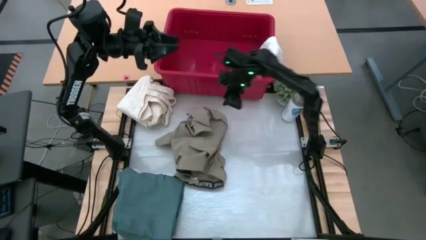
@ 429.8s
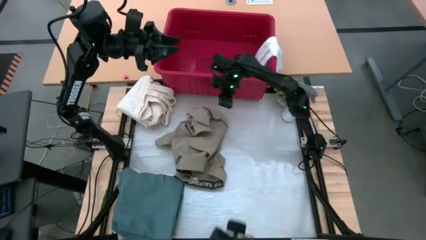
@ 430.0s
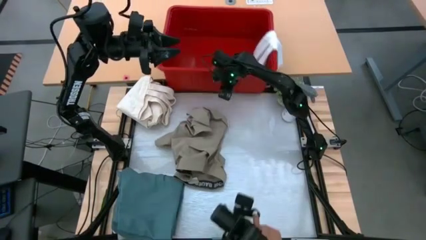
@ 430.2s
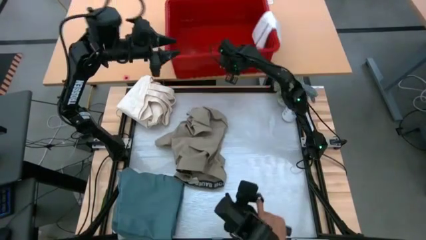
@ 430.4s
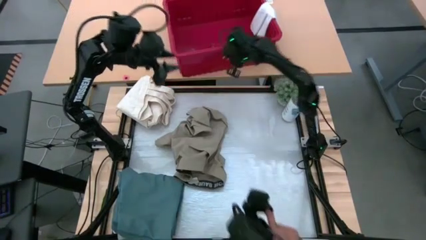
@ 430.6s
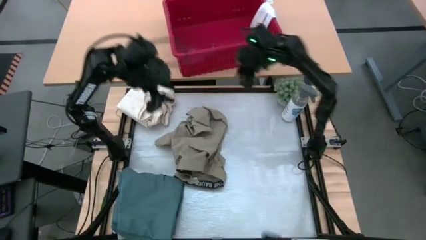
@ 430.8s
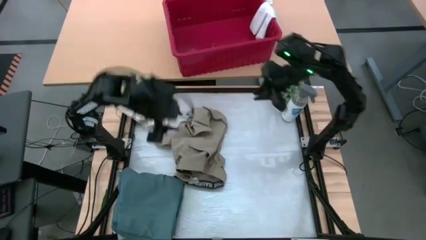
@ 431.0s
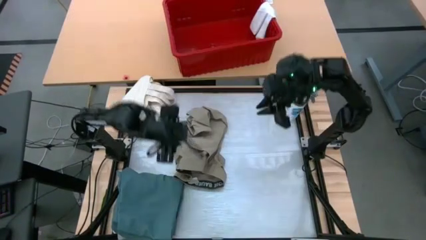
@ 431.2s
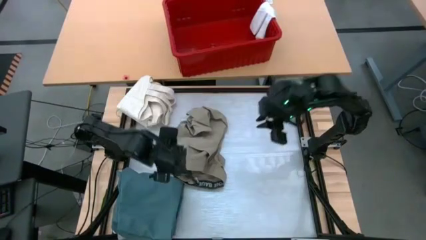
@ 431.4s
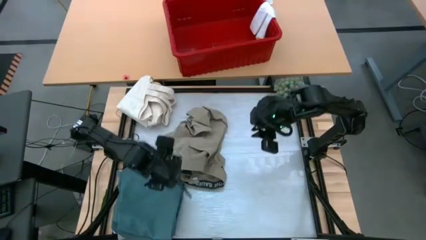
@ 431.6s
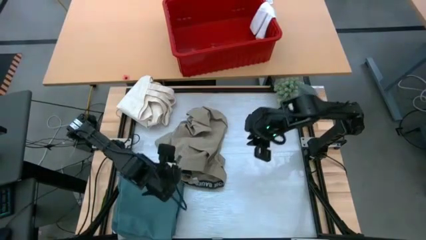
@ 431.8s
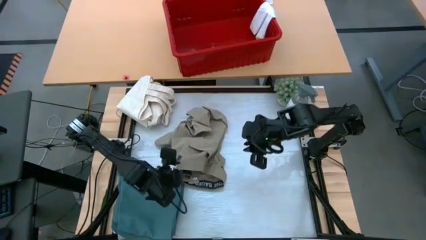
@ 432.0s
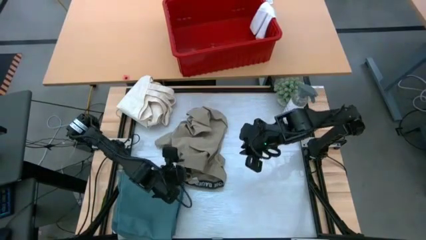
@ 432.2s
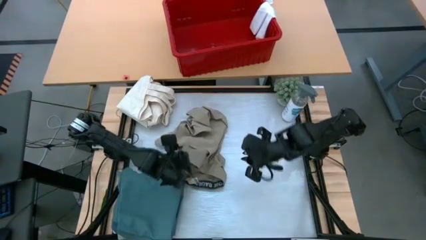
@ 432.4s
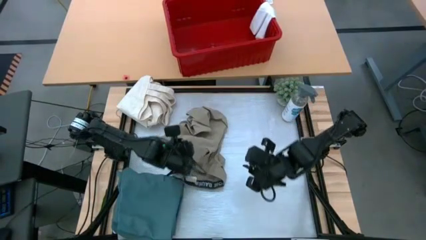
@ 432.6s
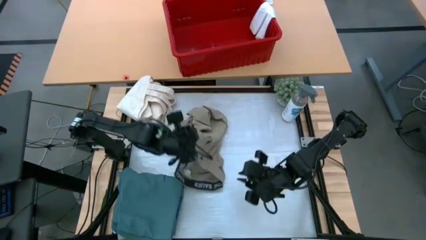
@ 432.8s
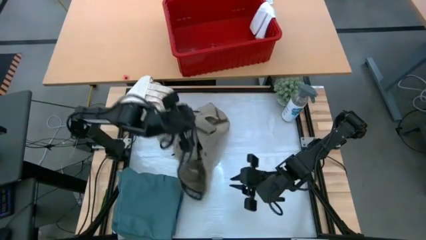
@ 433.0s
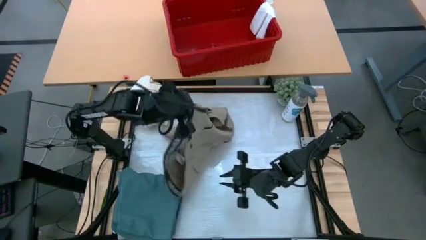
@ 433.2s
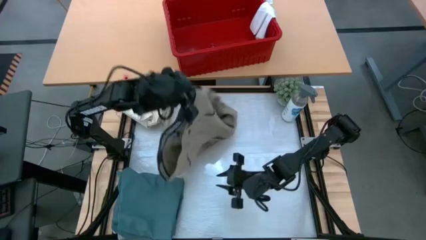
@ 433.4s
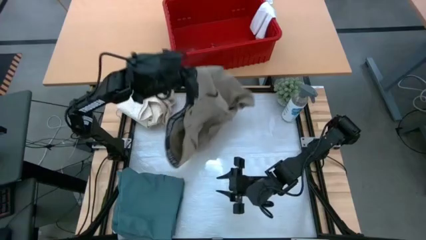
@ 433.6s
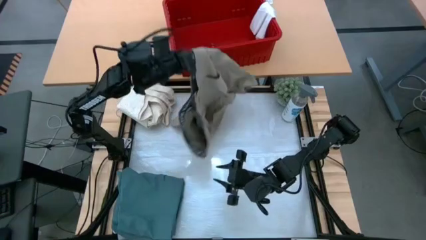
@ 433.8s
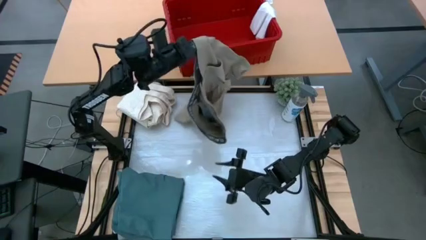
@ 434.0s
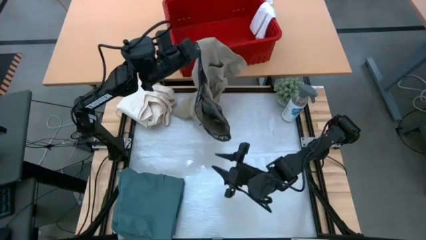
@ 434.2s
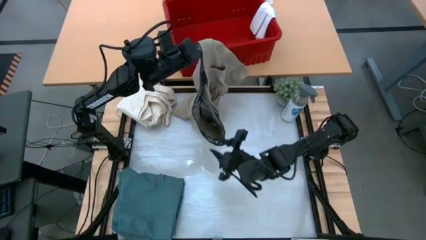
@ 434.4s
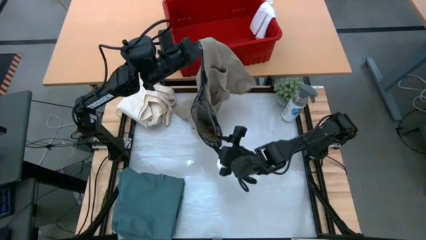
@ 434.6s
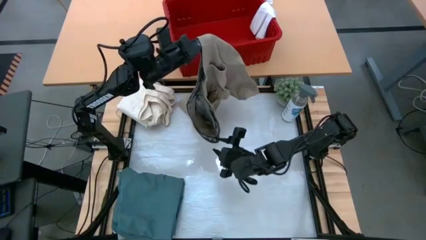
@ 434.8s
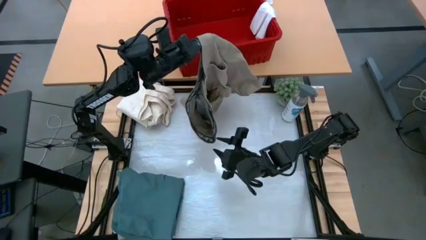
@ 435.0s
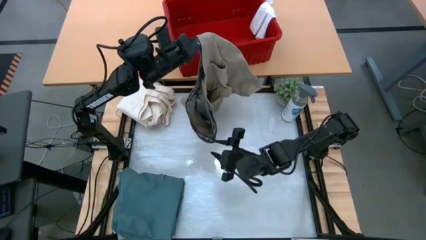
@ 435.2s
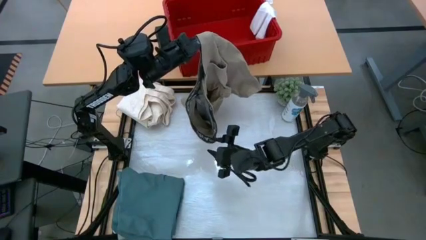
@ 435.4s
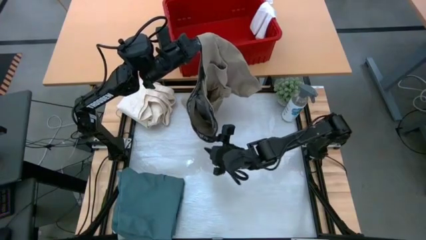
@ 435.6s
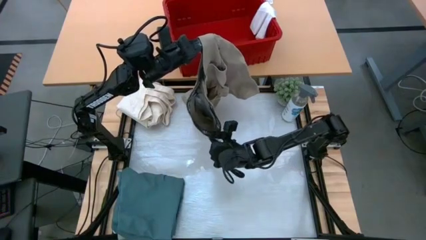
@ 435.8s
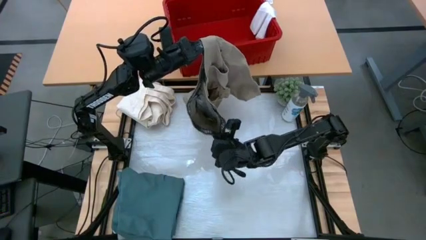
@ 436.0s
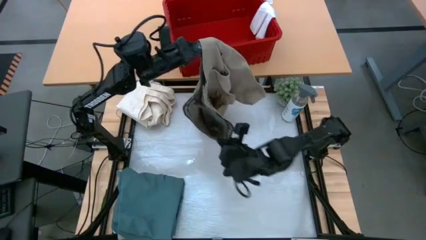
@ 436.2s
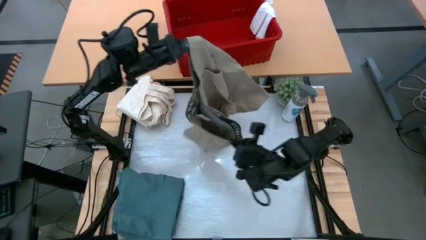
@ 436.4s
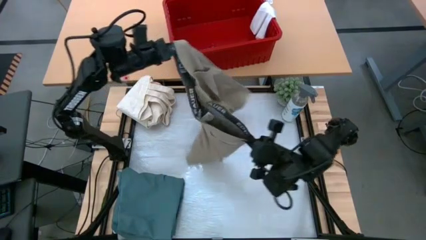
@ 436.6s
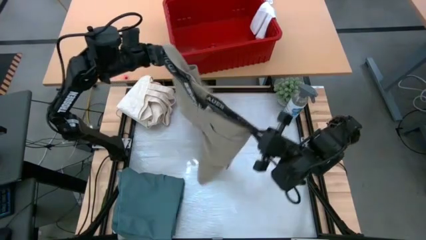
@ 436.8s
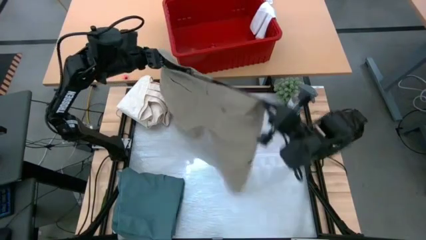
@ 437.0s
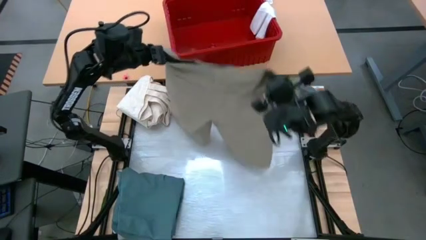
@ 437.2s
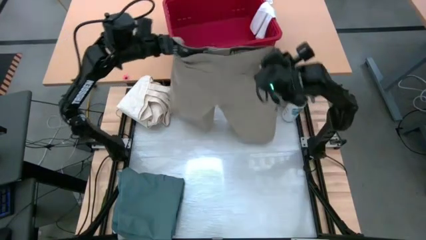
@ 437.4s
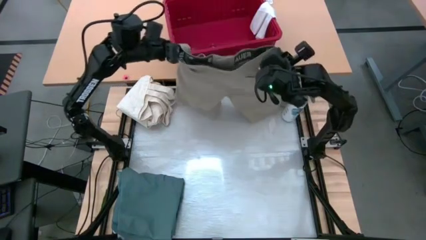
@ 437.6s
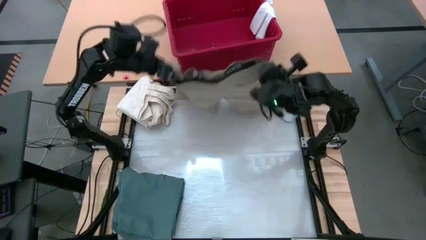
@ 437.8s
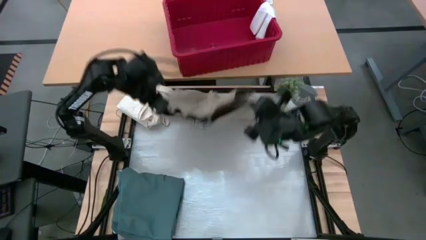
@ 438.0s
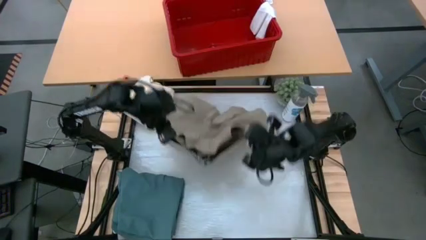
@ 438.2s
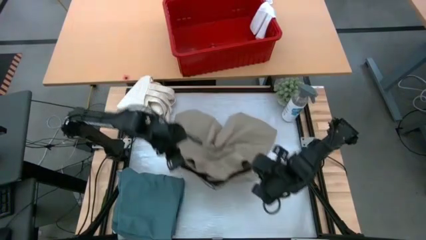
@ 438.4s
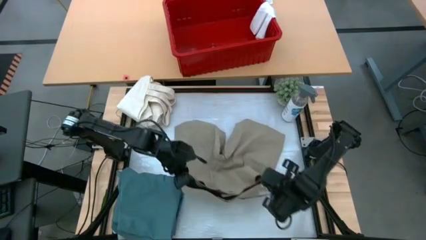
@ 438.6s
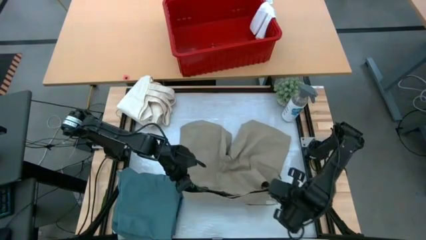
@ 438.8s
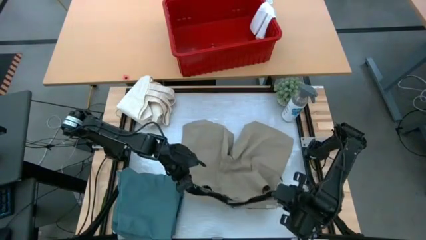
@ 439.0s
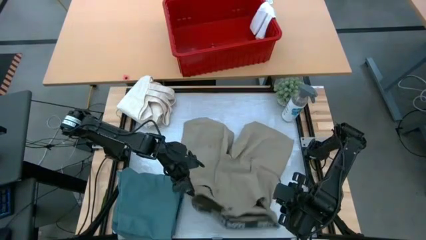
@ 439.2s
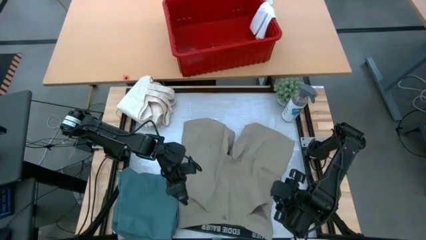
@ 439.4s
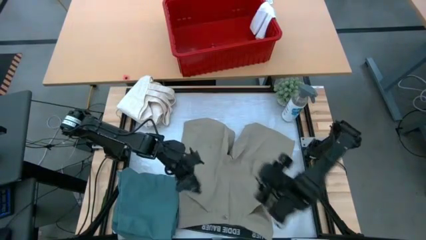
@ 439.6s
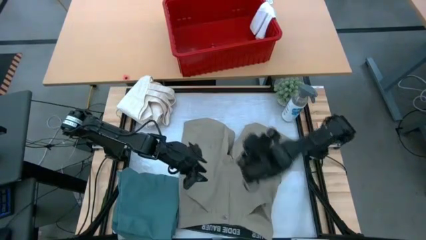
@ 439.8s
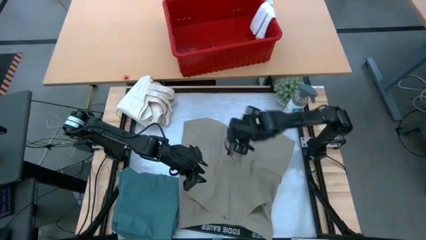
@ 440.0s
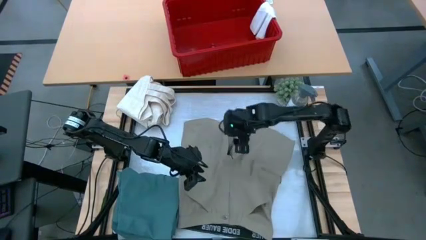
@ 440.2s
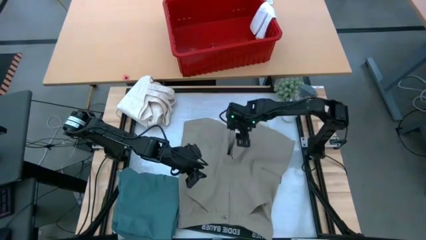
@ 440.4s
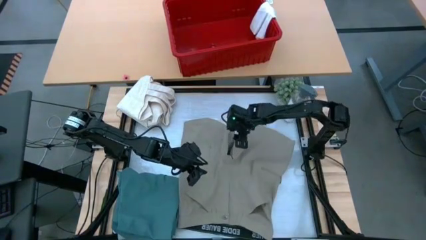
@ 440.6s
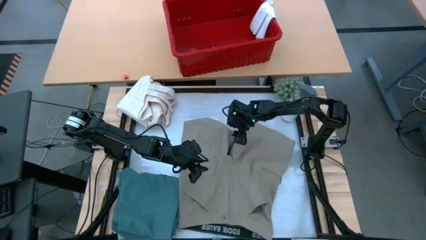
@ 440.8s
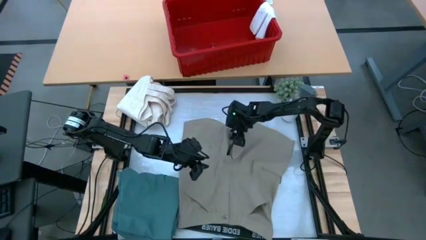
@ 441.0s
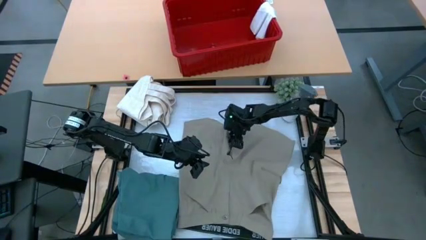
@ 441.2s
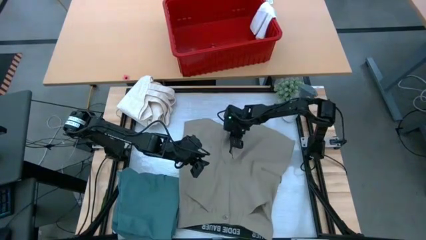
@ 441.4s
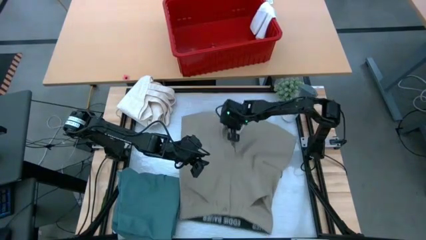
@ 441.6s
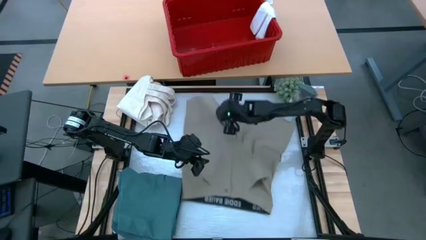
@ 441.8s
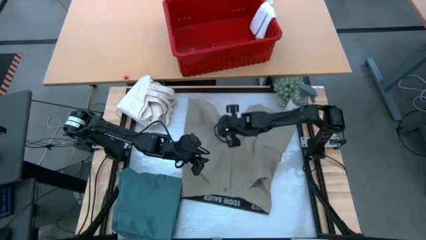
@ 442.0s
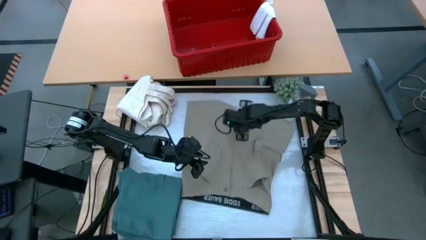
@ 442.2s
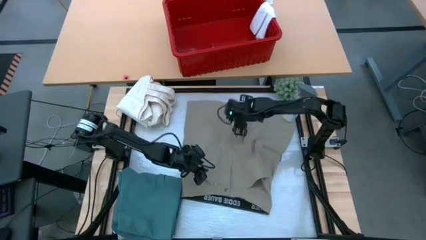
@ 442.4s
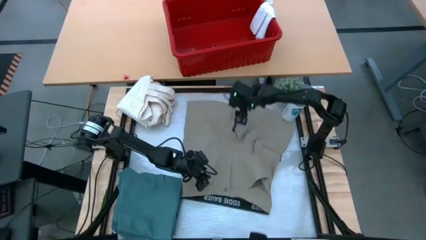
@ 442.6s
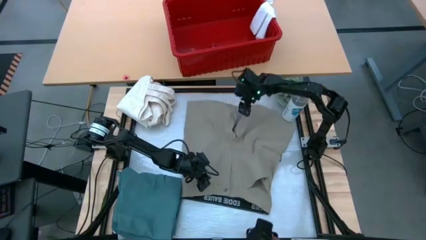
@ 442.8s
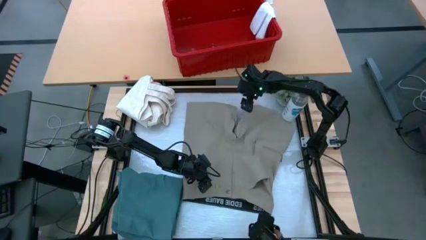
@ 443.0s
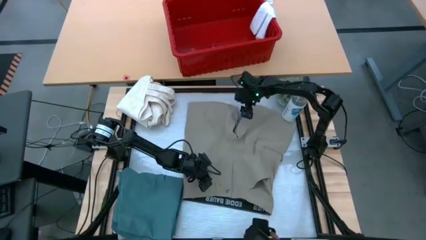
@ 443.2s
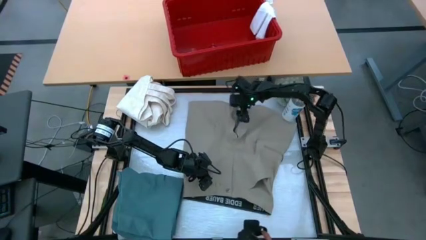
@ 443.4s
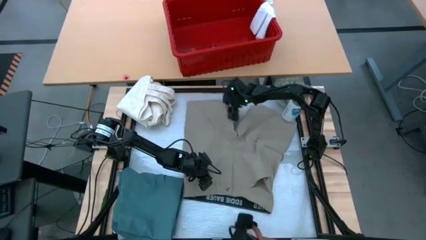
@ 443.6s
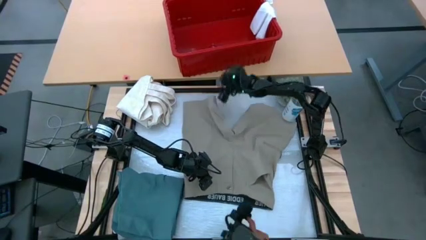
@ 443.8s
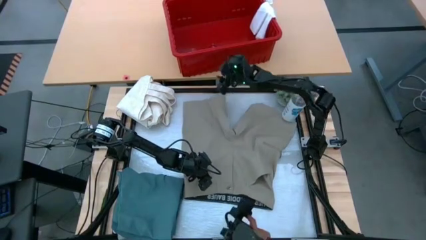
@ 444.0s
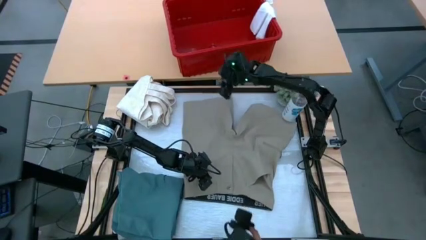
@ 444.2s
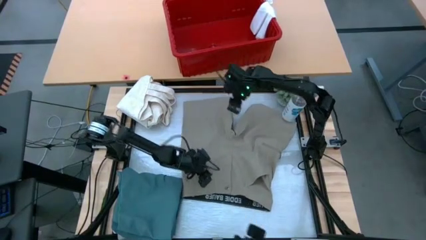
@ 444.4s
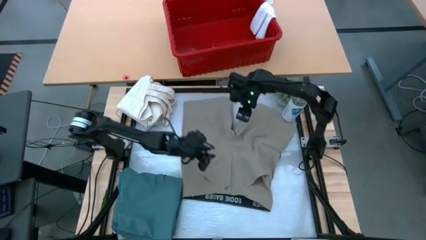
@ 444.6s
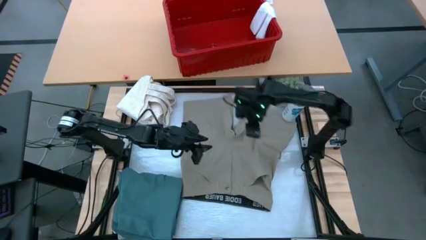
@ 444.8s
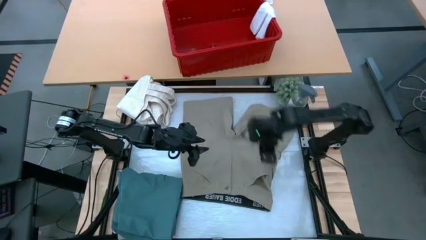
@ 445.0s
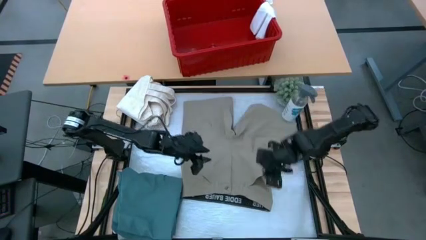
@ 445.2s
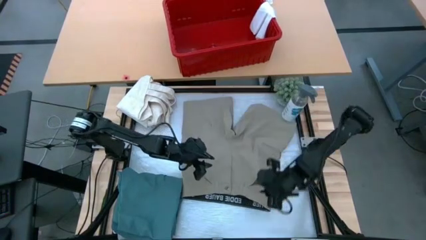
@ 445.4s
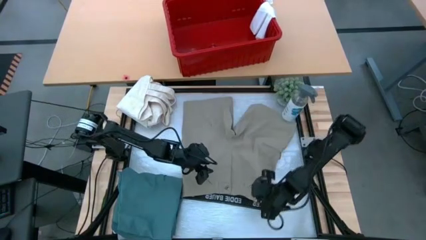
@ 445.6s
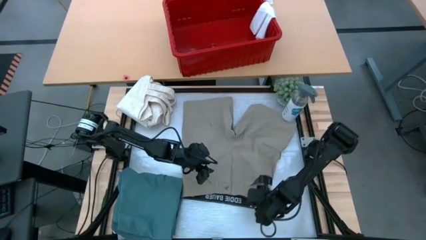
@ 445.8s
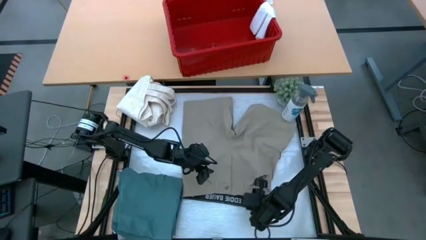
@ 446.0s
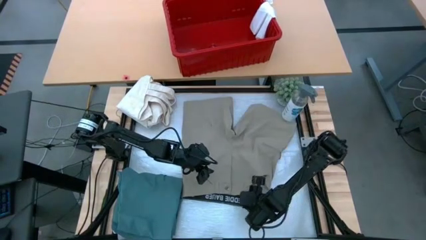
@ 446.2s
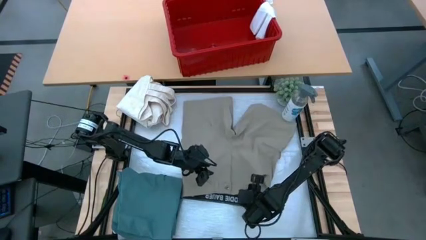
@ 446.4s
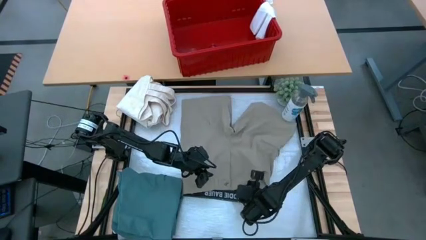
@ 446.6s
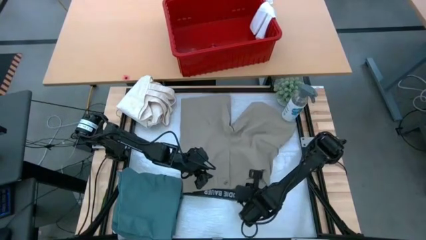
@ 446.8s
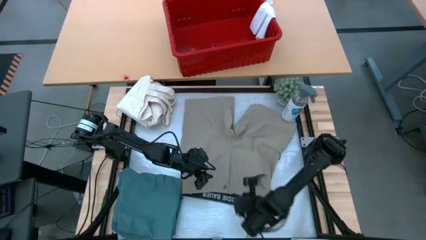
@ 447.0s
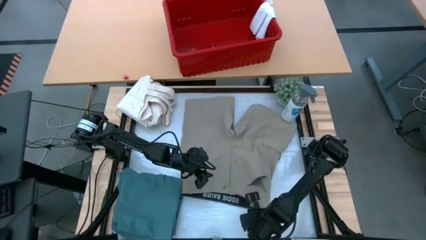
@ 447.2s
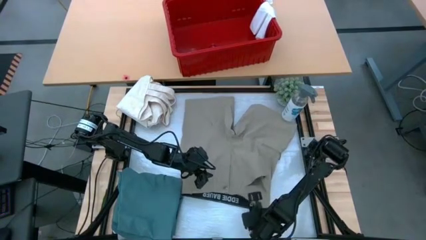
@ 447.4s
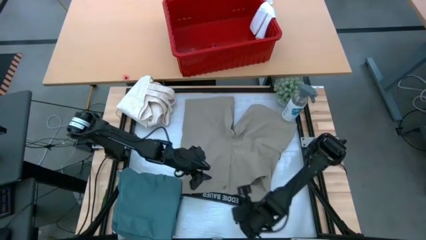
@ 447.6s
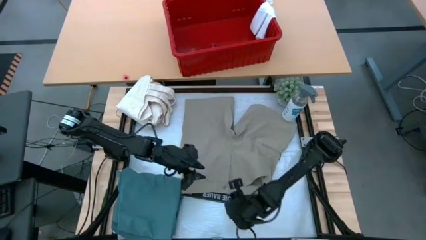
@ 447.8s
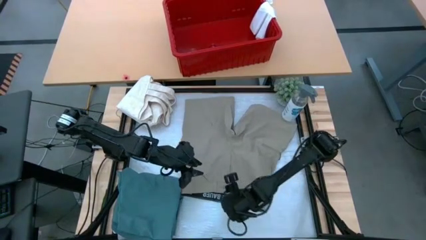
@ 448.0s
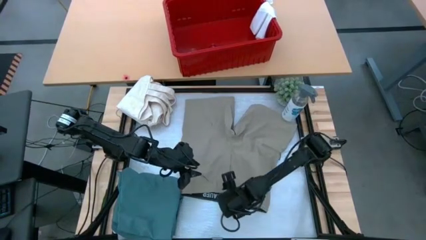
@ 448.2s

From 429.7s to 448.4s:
Task: Fold Laundry from Bin
Fold the brown shorts
